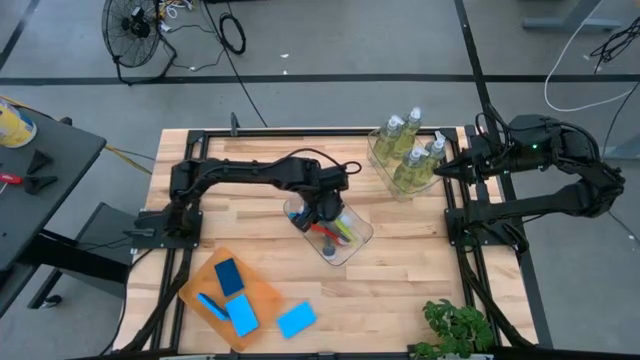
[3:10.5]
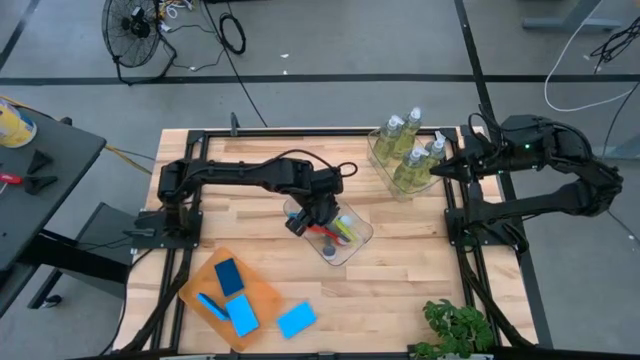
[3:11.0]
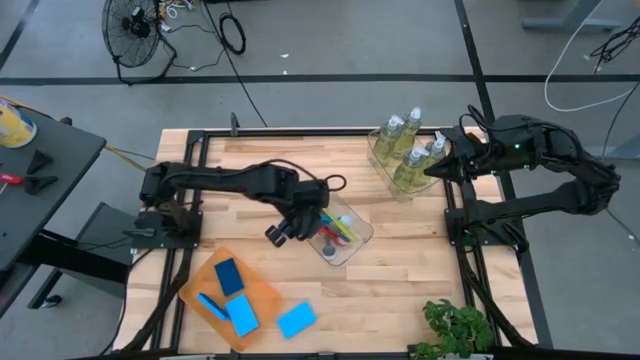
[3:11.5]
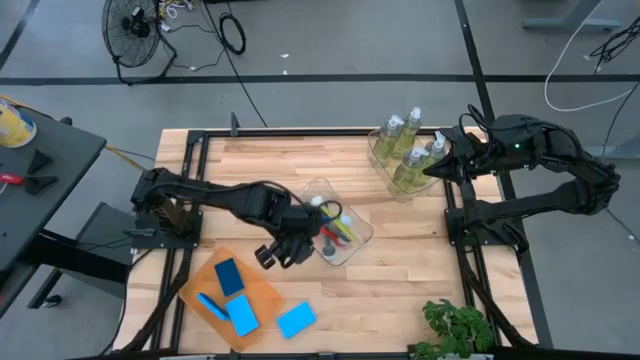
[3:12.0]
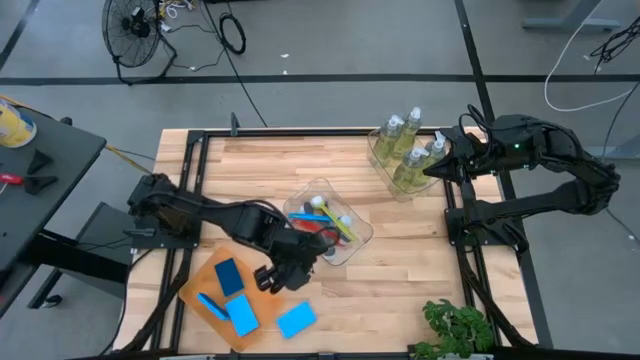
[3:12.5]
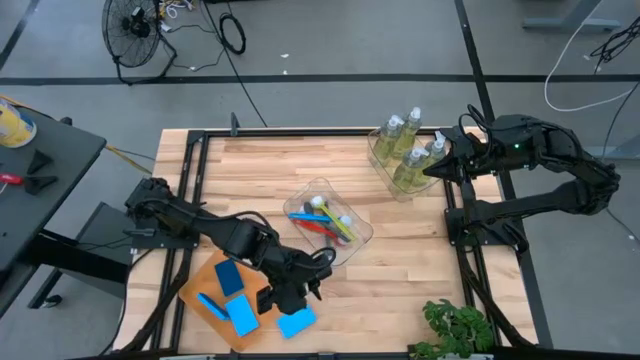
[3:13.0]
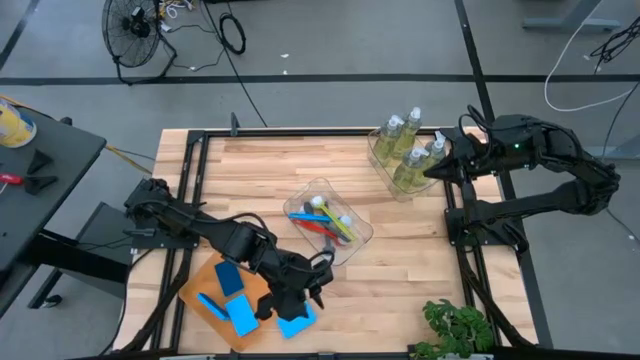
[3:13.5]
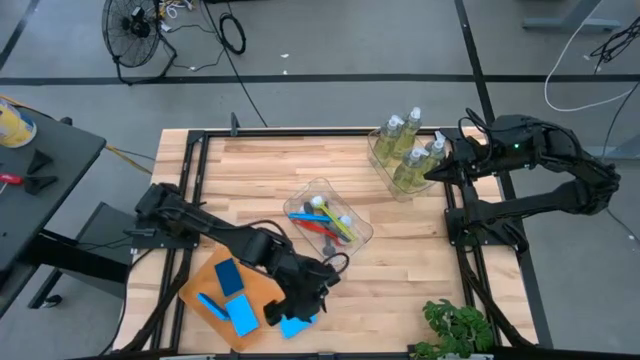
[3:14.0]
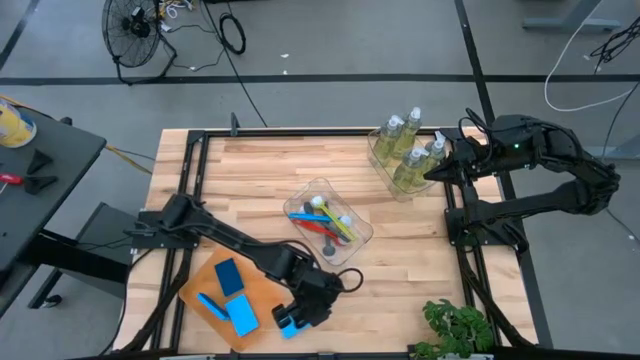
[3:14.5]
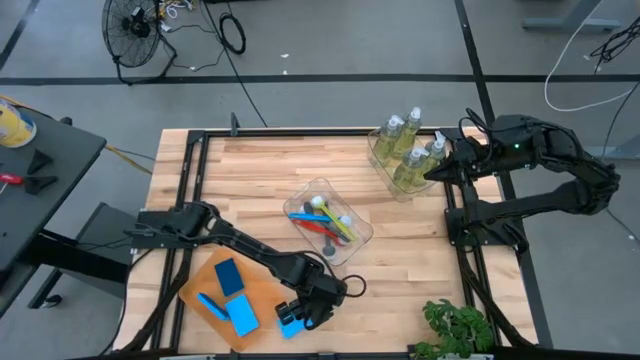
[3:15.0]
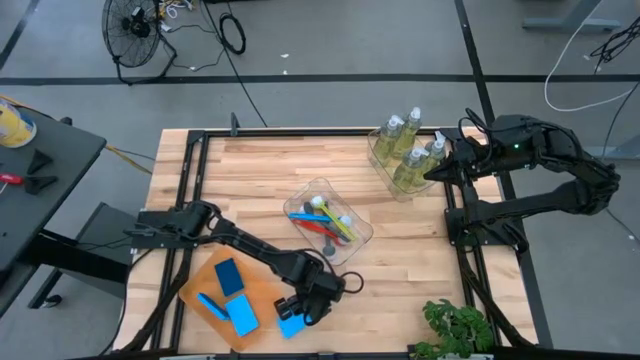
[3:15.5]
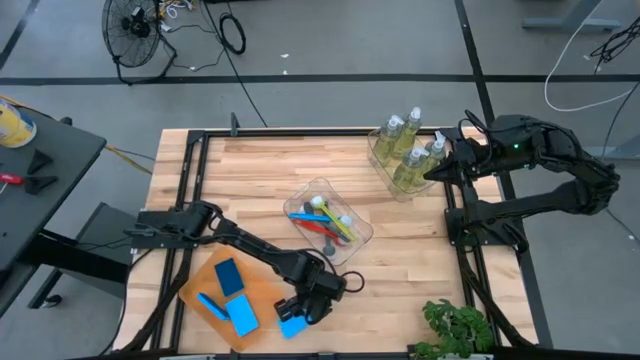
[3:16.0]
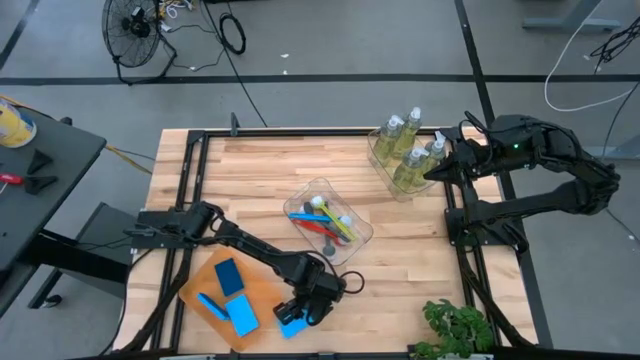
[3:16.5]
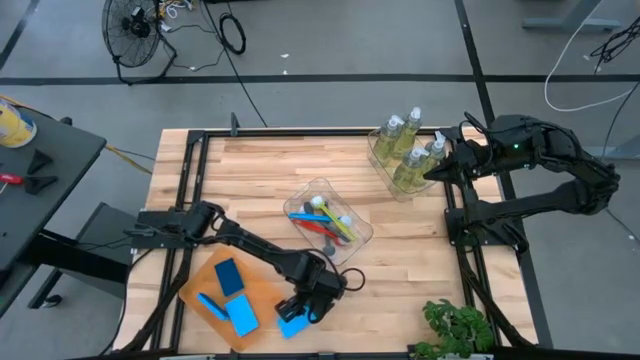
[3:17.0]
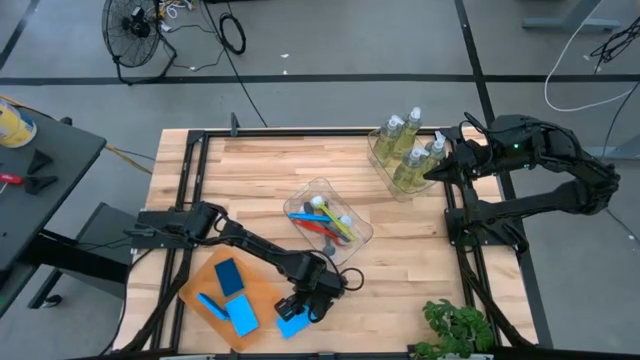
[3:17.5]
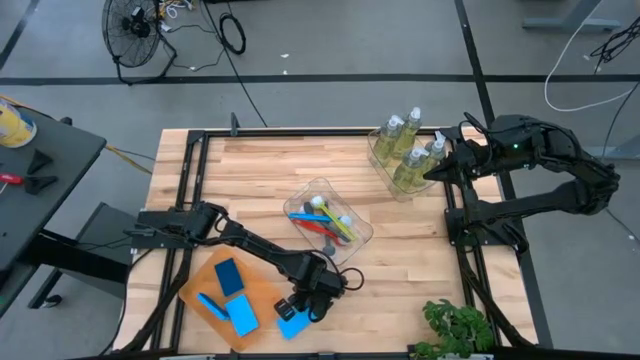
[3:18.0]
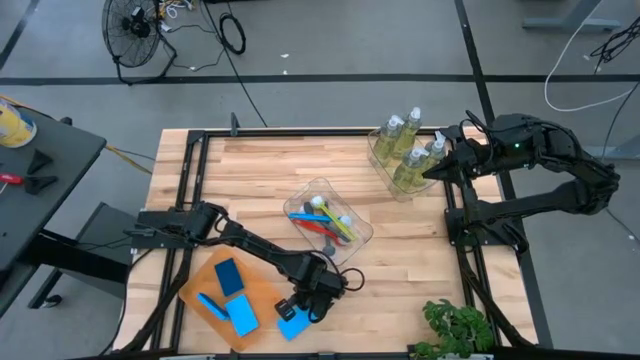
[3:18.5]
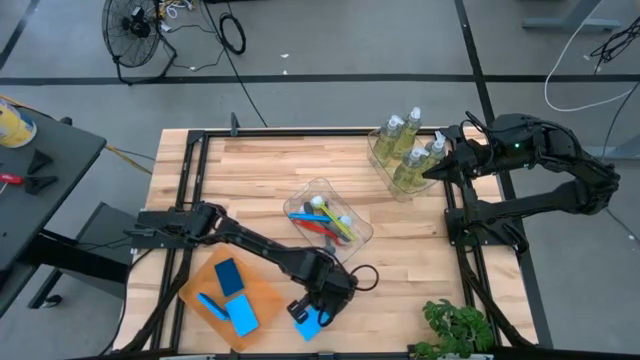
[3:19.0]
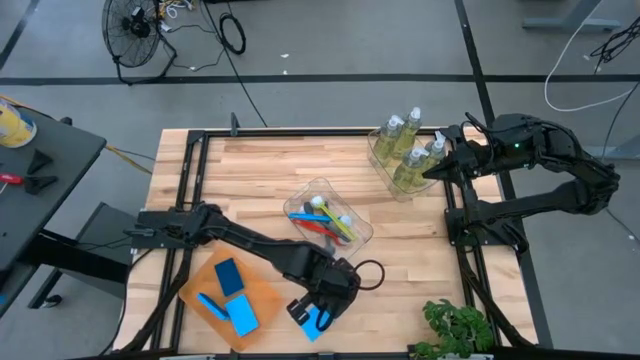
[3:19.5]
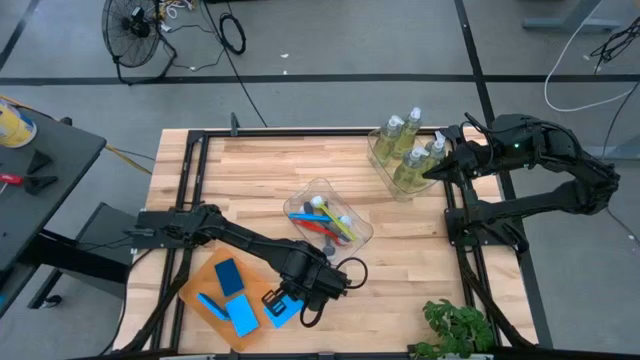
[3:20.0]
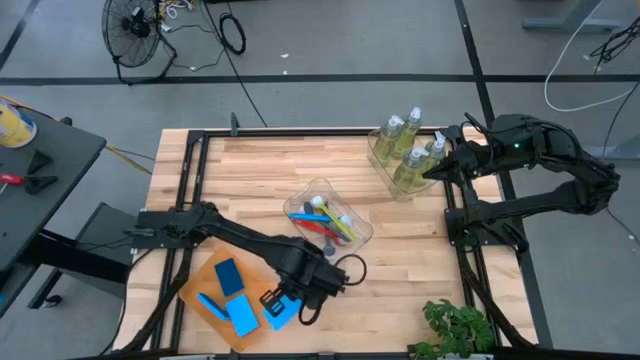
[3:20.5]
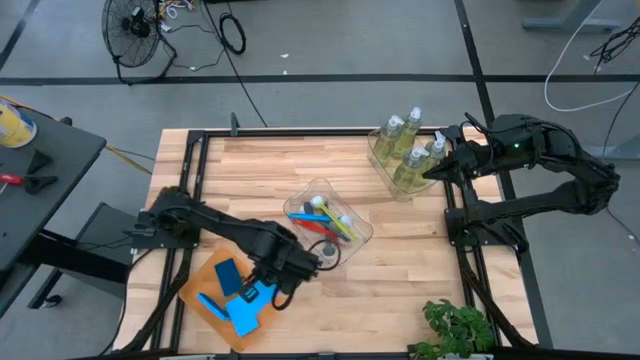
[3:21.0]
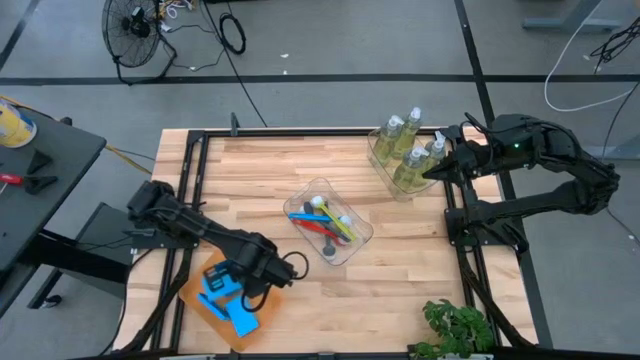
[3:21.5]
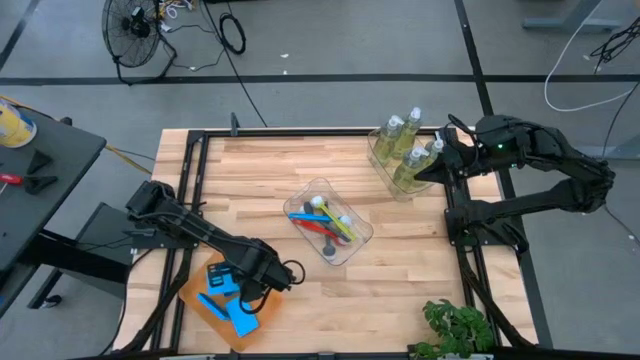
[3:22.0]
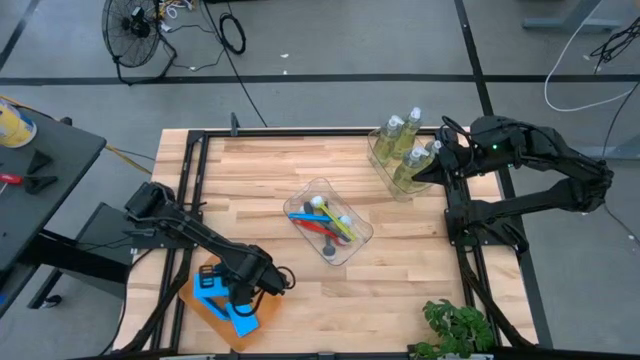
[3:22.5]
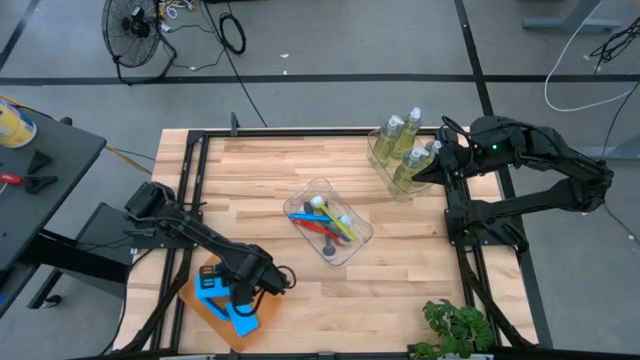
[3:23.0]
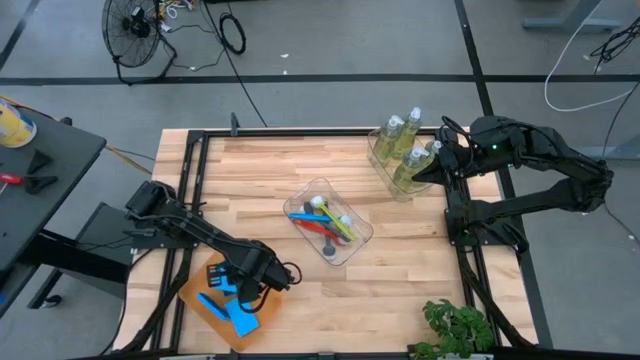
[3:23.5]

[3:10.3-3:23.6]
Task: Pick & Place Kitchen Sink Supplies
Put the light blue sponge into the transparent orange bin

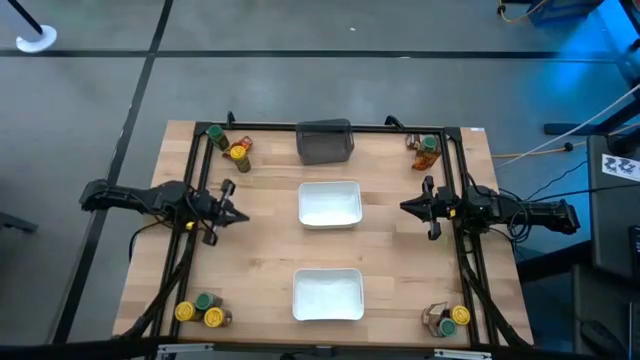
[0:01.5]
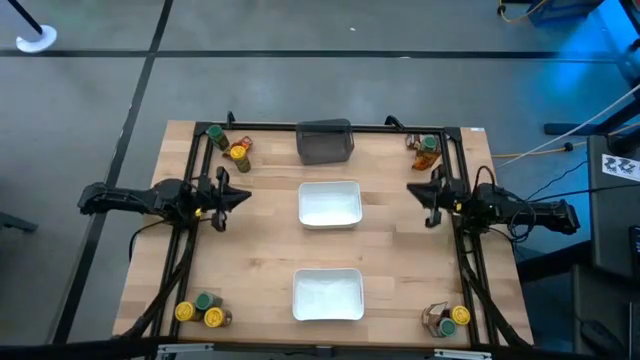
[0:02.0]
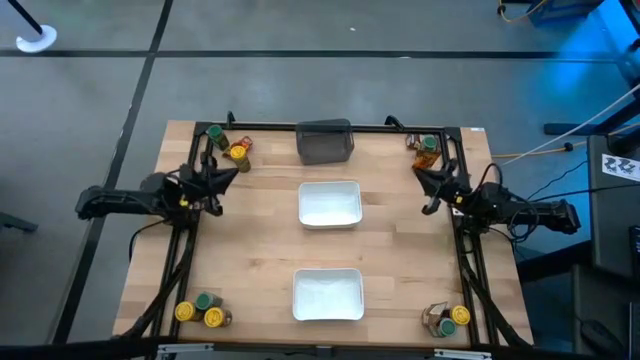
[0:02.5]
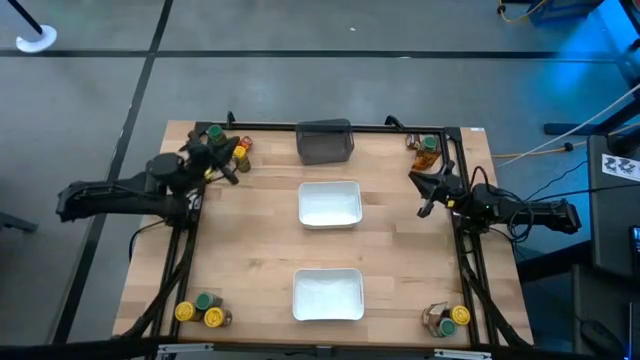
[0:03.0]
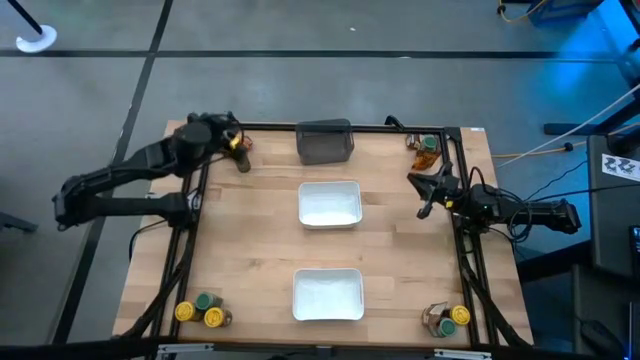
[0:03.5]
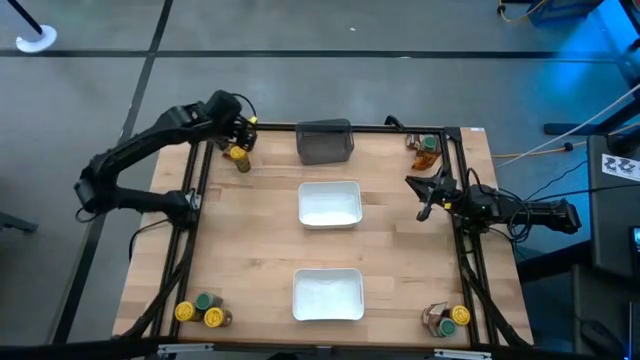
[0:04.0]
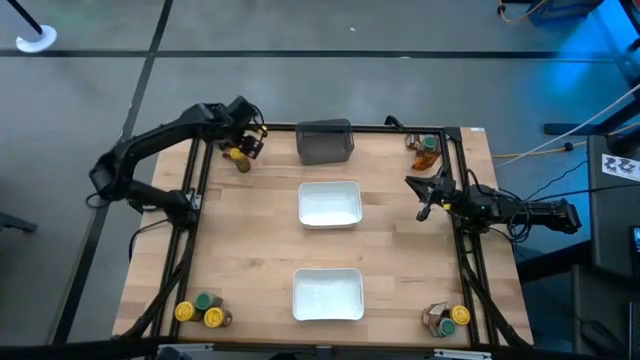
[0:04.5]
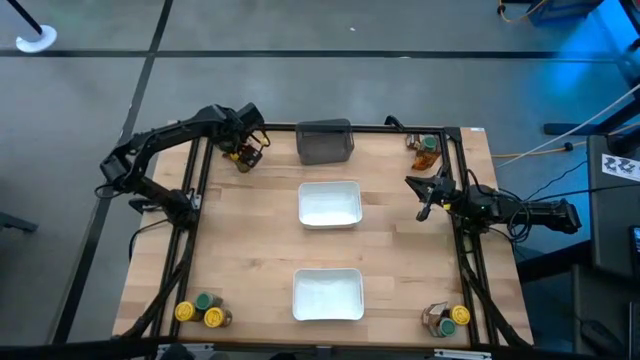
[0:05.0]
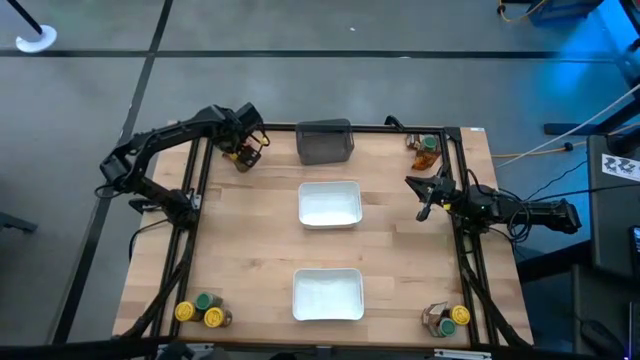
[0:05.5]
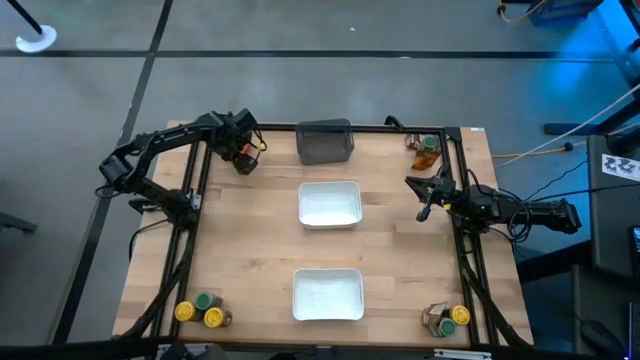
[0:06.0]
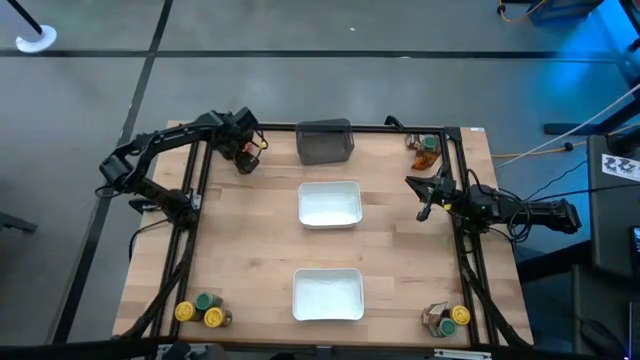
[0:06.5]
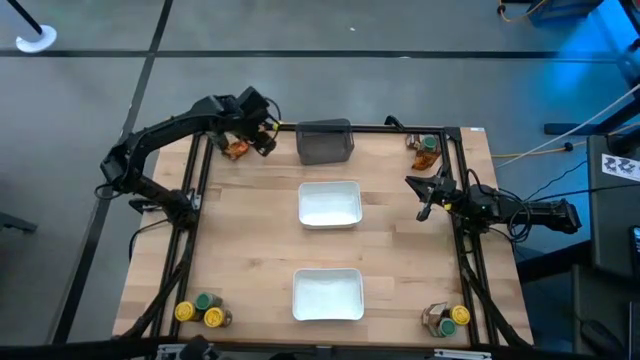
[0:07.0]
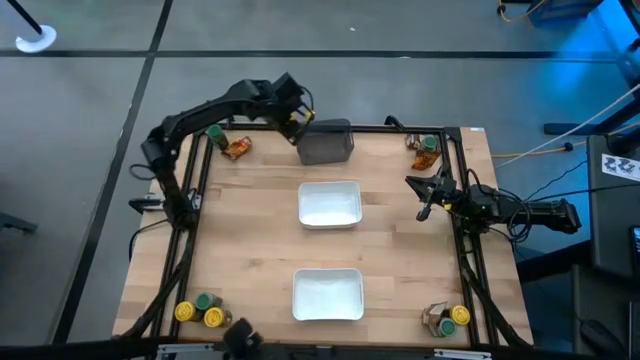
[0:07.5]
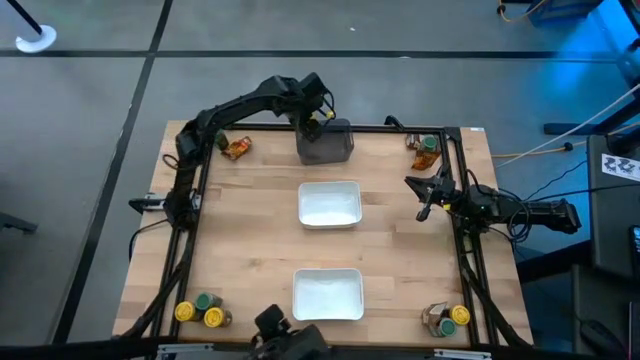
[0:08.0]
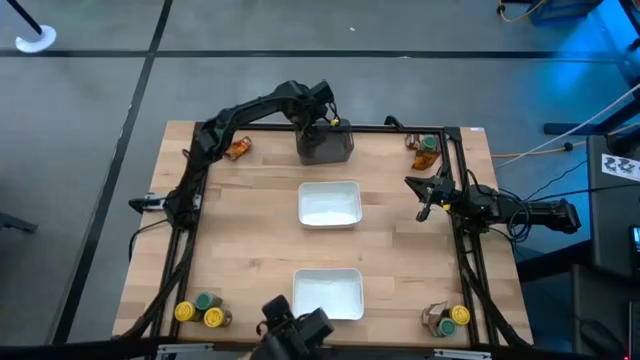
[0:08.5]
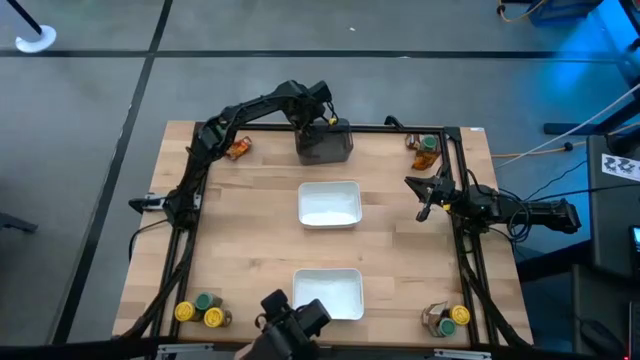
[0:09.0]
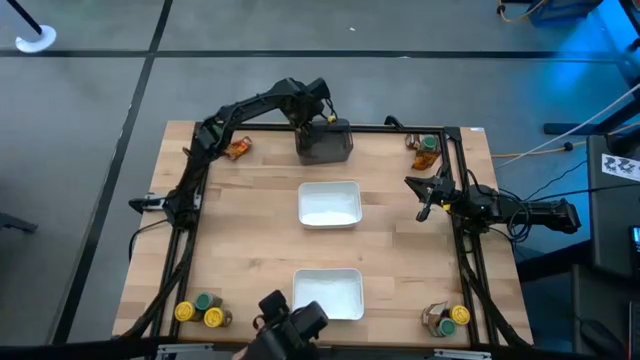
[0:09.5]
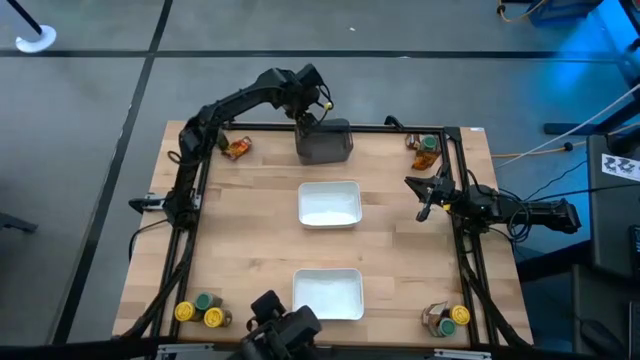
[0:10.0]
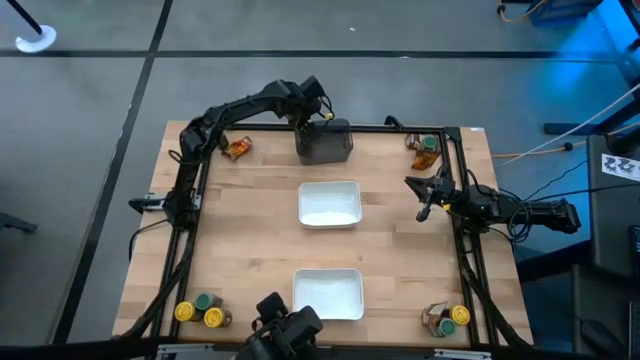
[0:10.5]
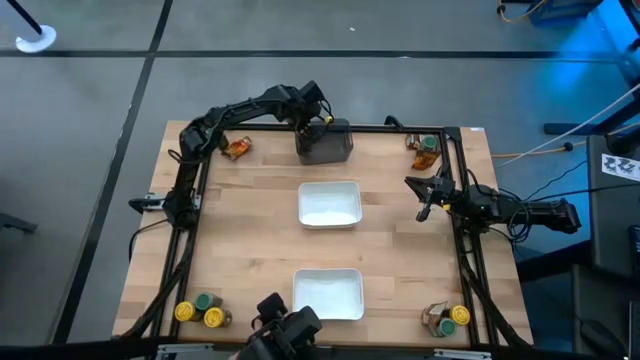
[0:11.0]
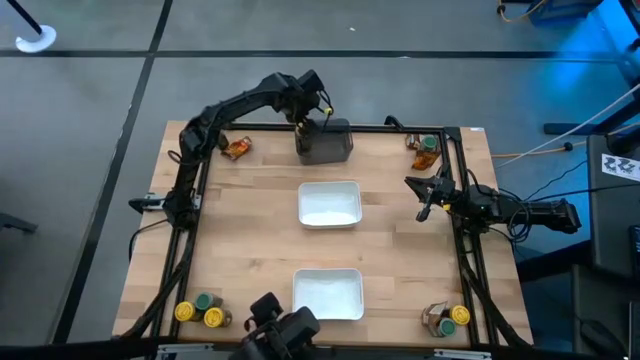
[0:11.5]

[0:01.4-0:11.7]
Task: Sort spices by type
Put the yellow seasoning bottle into the black bin
